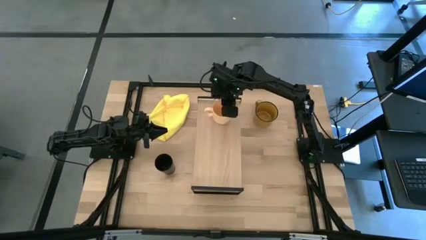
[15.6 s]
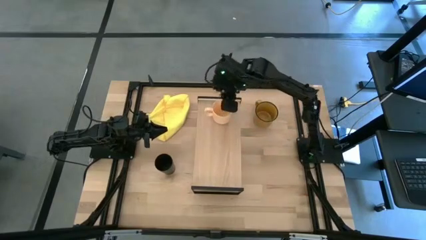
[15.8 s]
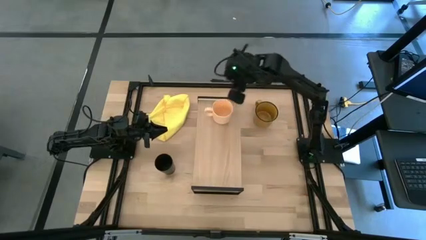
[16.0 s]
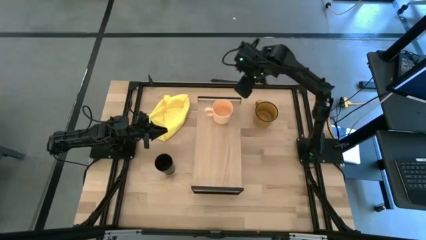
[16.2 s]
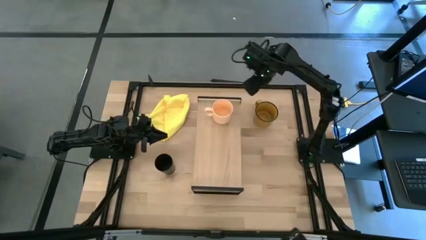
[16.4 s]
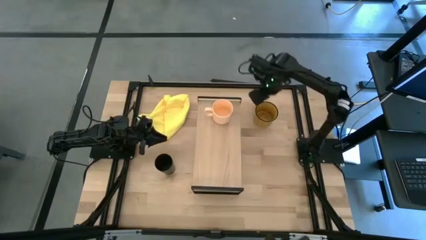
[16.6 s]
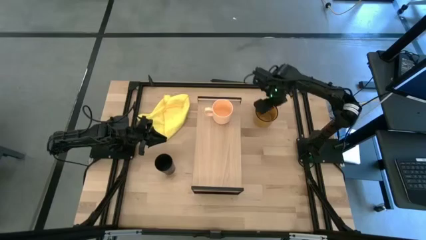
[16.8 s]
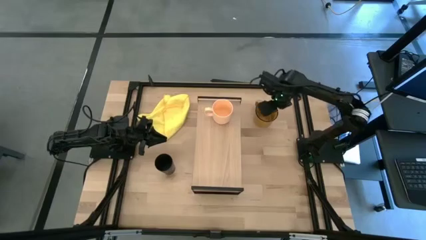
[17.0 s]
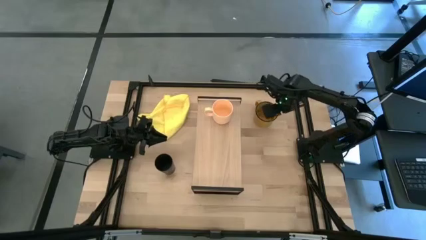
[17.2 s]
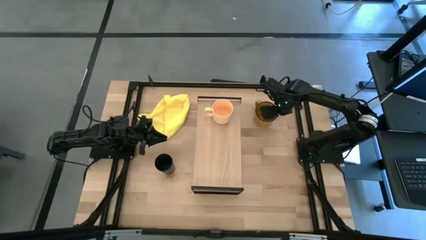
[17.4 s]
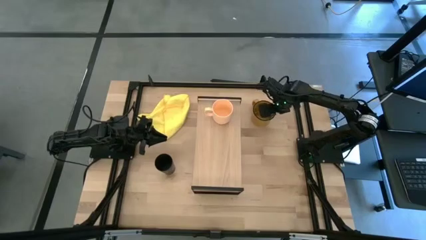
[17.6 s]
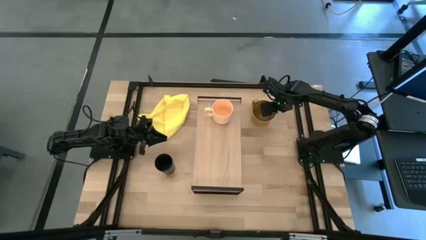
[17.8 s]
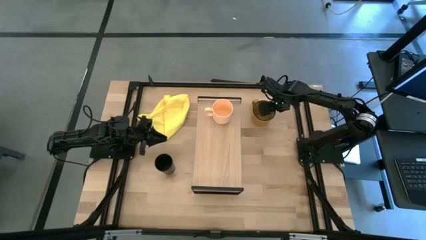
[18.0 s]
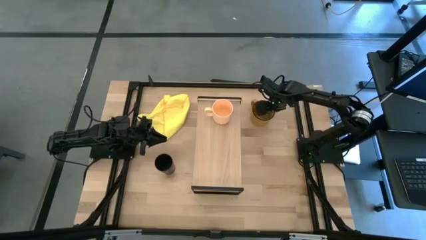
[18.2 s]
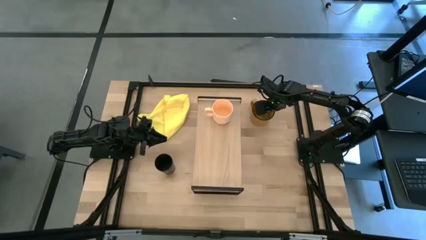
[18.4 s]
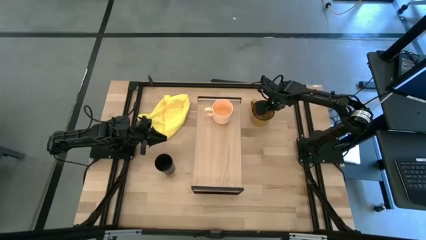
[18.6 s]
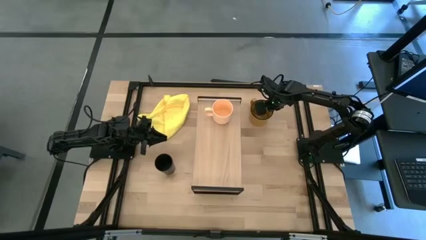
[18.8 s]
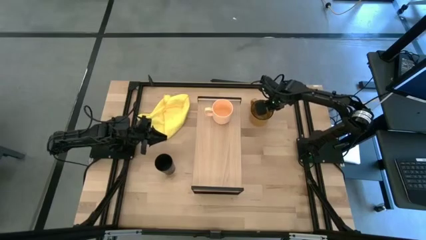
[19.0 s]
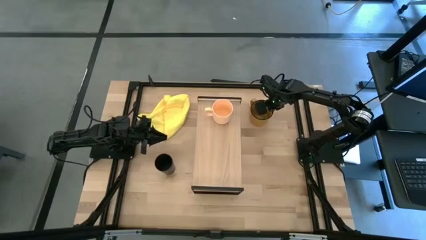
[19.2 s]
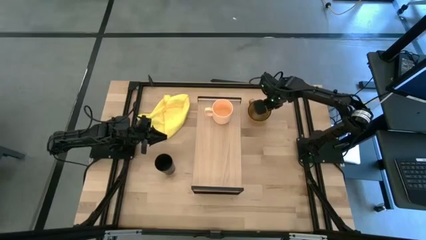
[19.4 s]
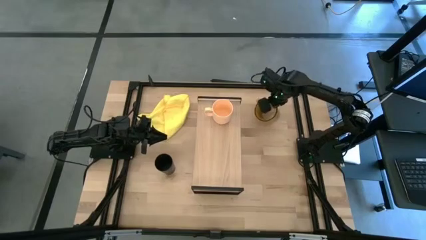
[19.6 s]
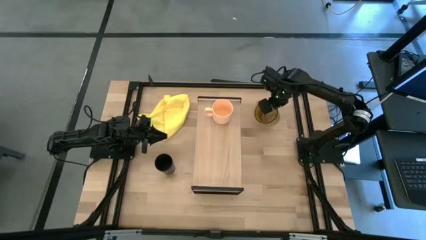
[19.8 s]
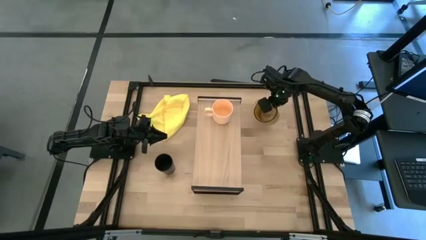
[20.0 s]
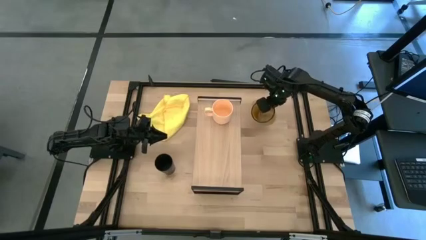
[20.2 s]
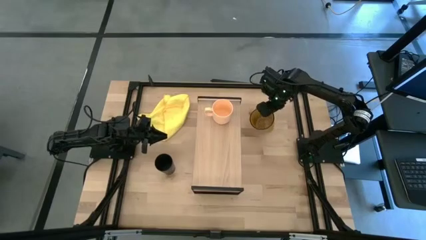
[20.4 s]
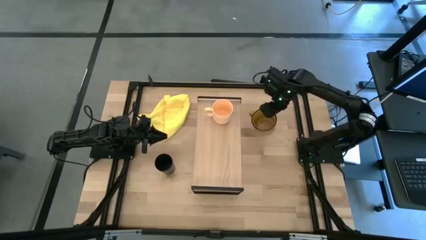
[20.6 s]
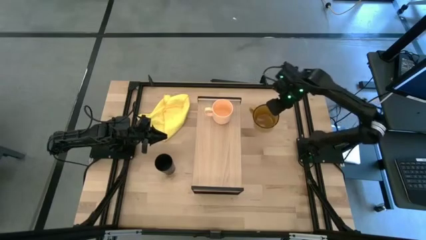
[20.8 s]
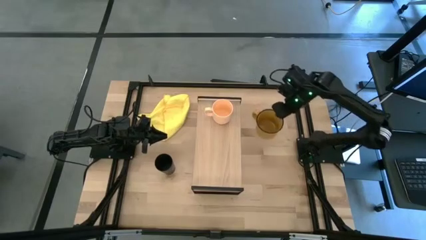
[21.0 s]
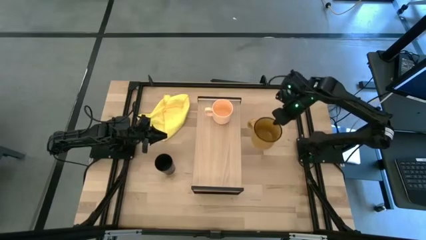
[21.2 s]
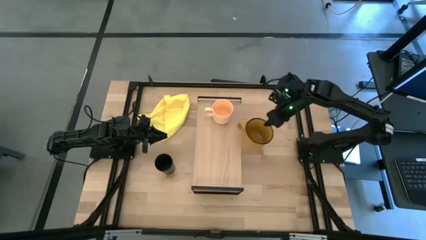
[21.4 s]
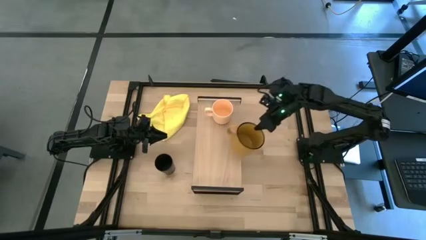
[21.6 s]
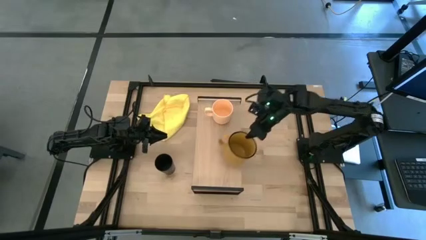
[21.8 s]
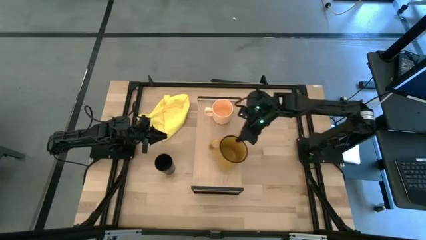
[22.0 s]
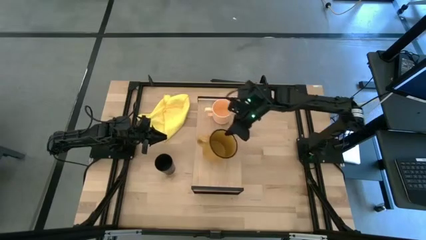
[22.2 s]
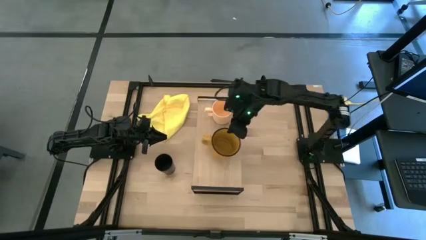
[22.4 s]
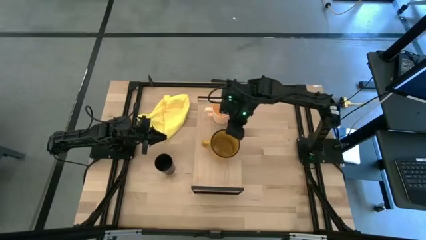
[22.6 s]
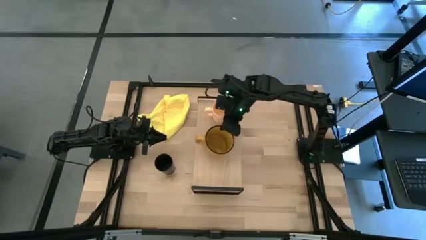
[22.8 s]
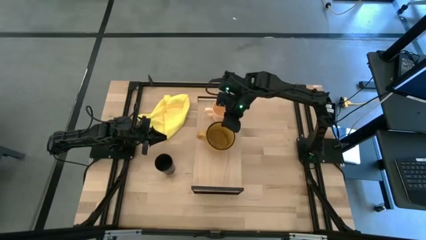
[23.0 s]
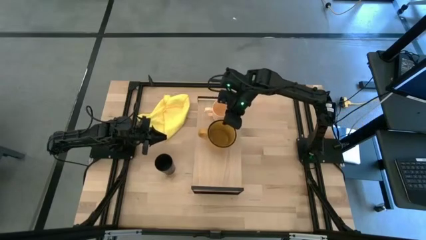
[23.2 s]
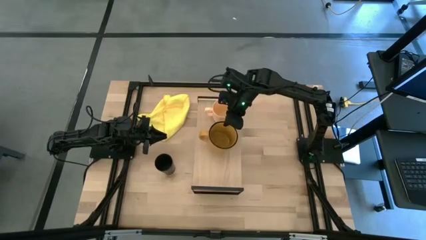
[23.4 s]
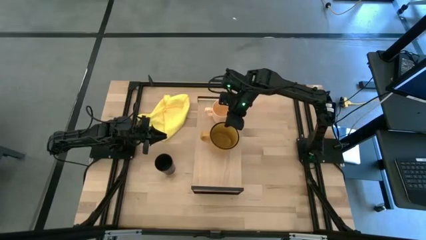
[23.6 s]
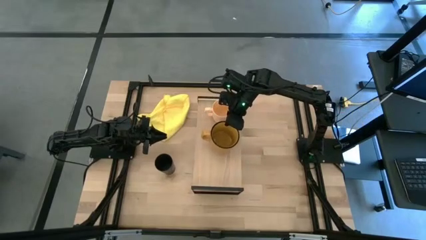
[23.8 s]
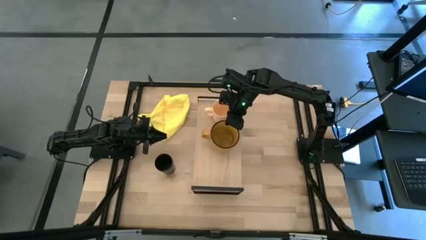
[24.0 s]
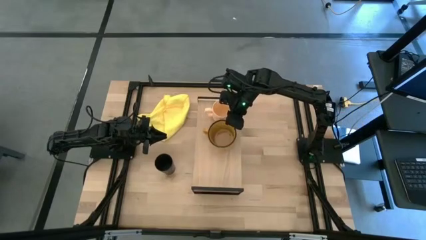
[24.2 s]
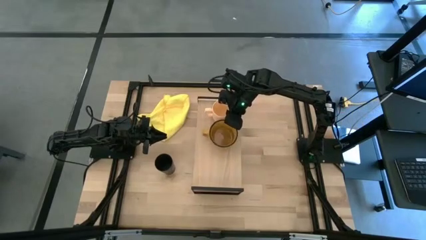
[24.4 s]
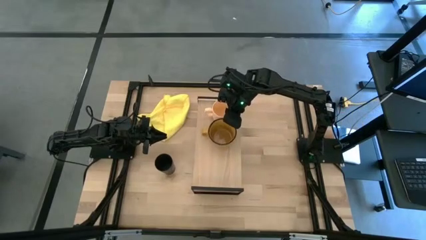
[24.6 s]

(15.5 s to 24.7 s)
Task: Stack small to large cups/mugs on shelf
Put the brown mug on the shelf

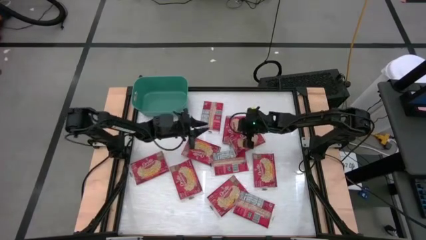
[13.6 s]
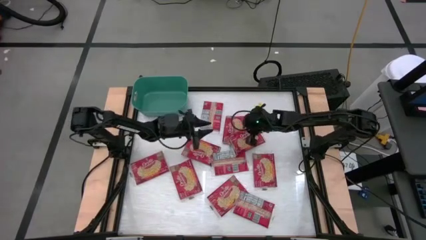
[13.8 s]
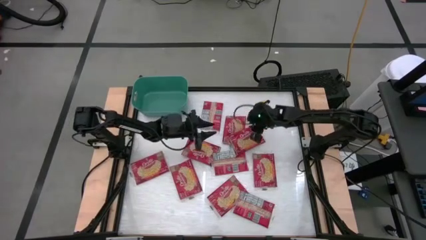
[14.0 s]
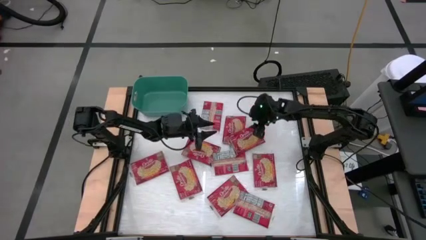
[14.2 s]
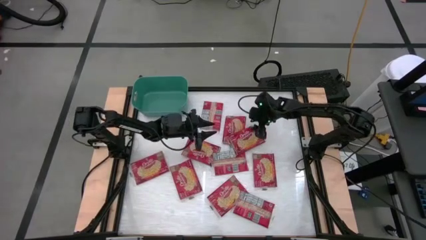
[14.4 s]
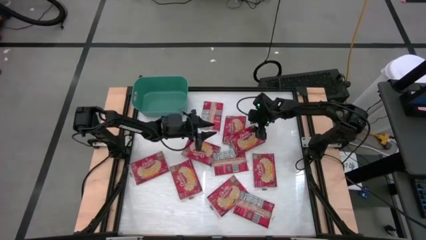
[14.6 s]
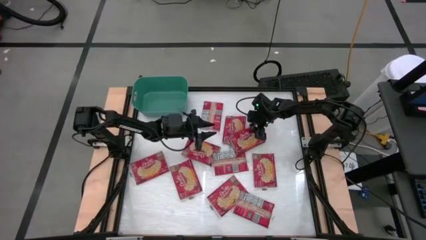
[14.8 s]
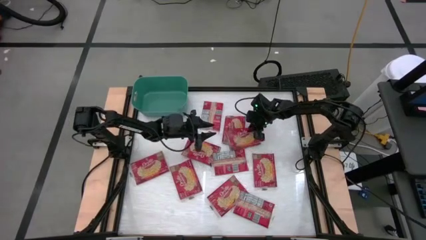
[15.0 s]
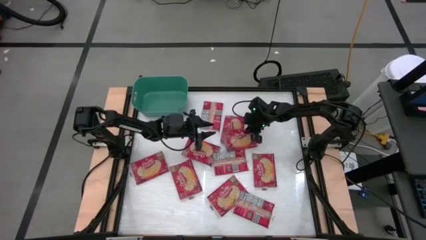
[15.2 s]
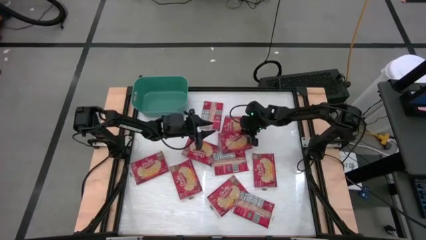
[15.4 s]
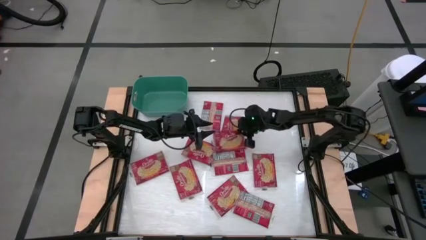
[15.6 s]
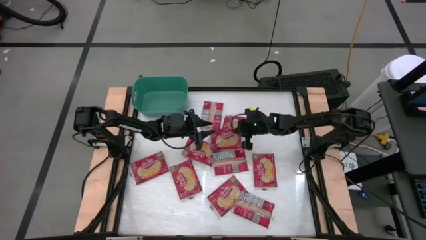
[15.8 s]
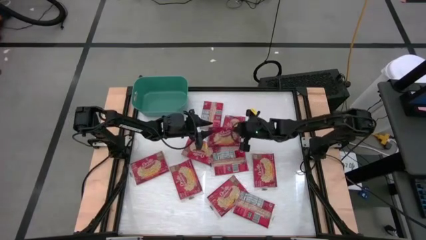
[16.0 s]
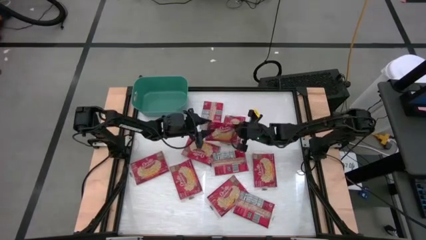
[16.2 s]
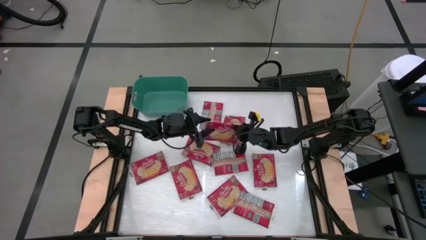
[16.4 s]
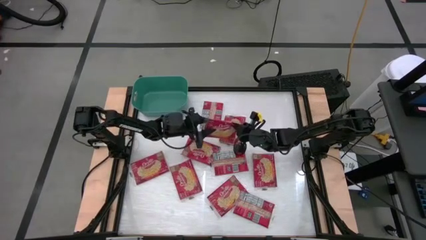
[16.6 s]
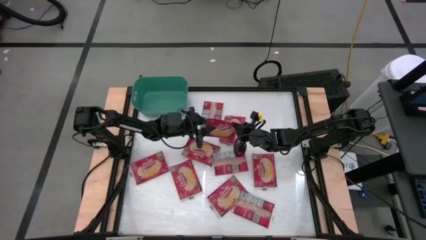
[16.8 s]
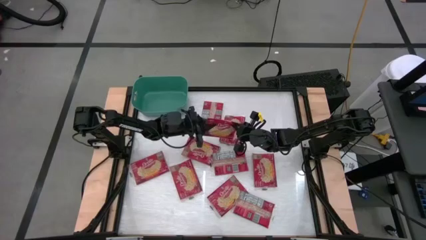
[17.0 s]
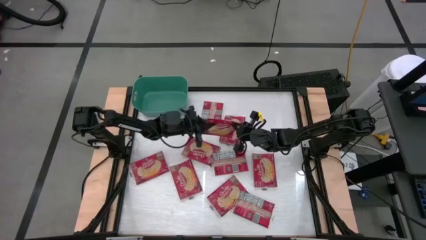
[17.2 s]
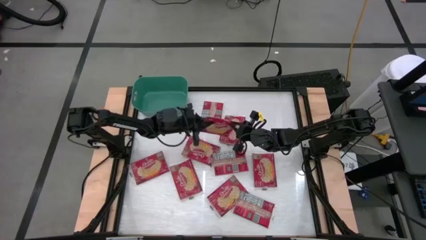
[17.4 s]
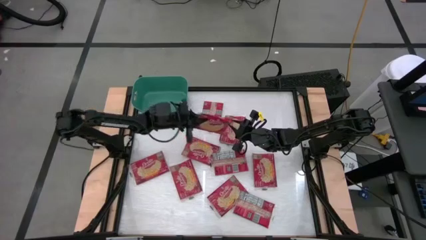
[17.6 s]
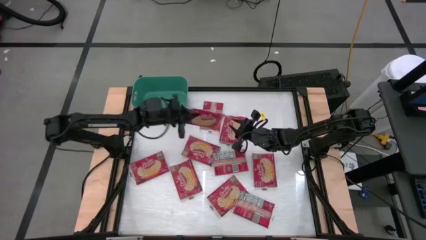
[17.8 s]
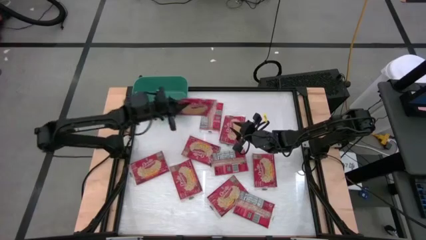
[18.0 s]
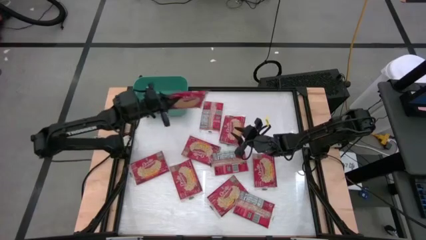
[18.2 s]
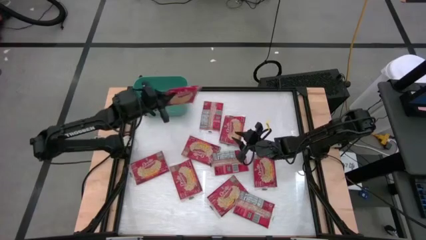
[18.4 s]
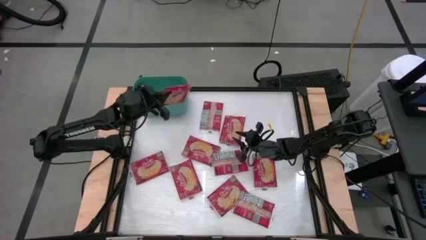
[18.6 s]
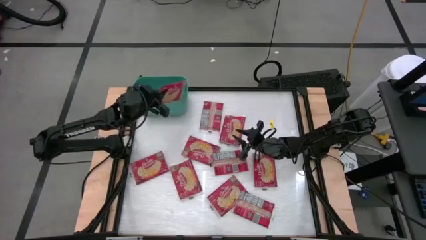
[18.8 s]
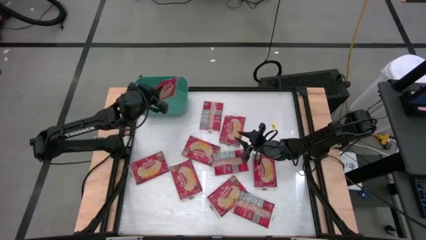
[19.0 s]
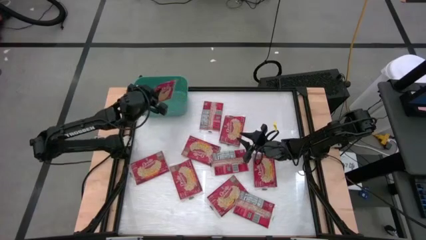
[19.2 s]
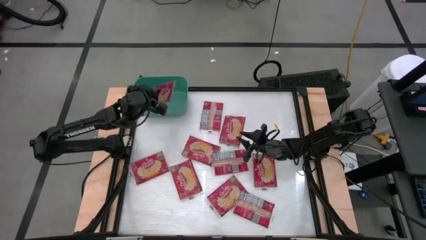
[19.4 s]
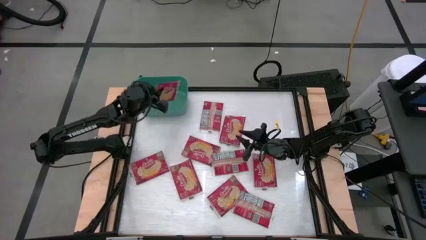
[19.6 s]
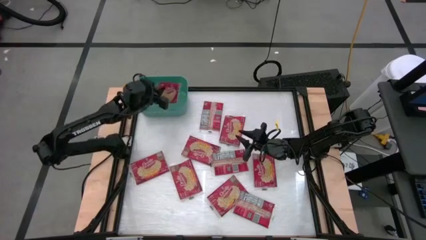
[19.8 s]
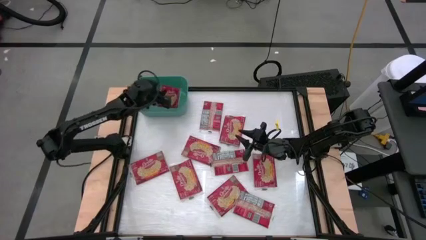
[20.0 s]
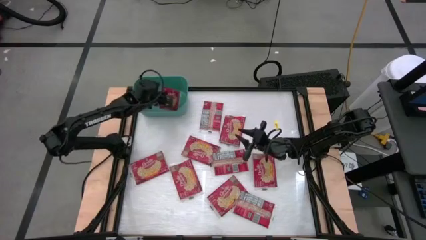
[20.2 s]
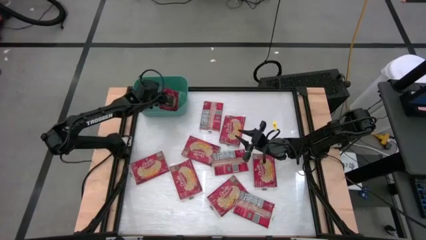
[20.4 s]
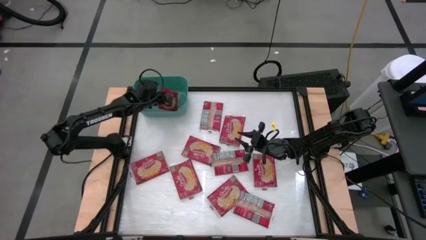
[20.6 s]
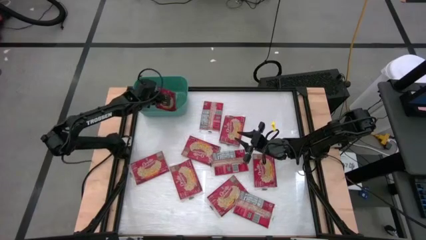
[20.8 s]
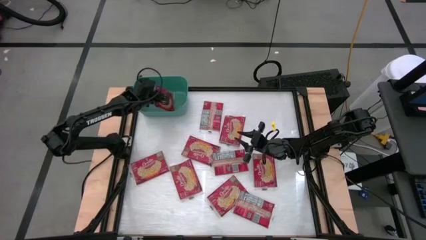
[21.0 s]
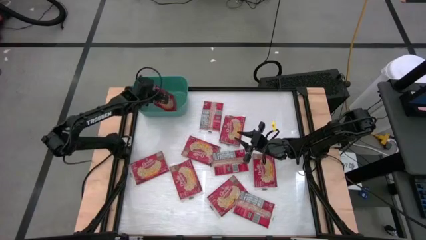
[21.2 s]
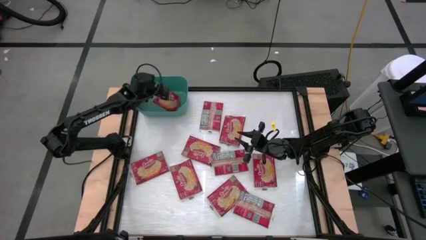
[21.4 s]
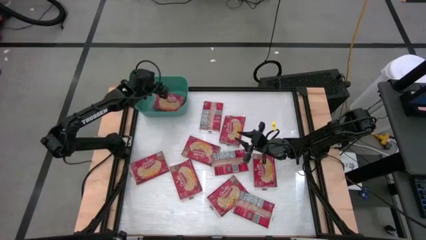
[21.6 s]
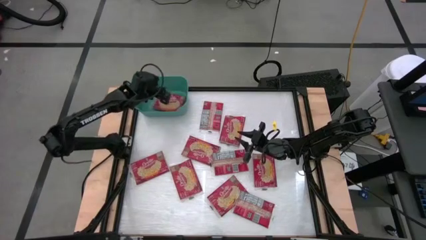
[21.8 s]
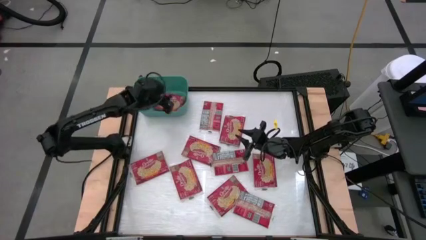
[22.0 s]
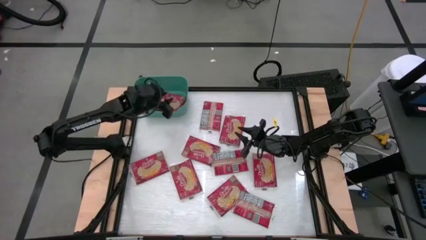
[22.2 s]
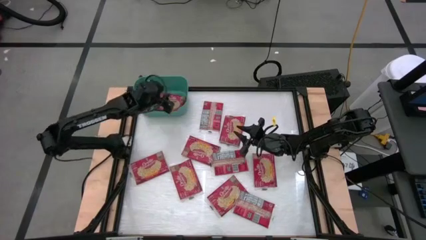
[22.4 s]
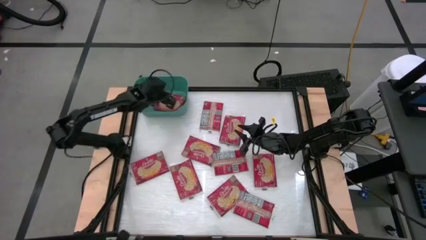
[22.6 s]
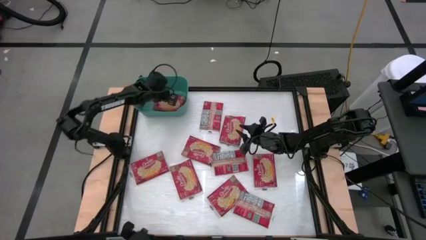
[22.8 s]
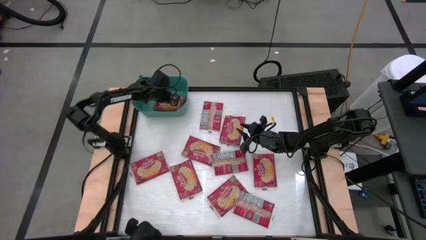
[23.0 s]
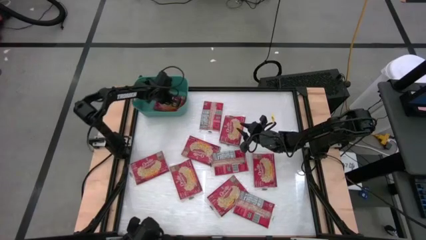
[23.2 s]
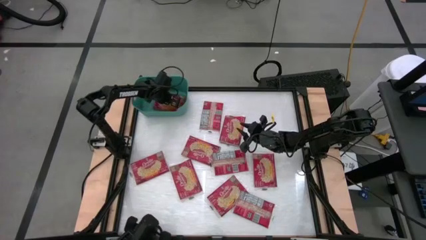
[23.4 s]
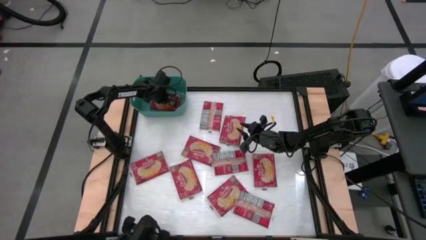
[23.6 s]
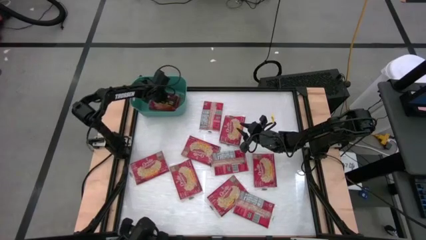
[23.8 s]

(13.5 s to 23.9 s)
Task: Sort popcorn bags into baskets
Stack the red popcorn bag on the red popcorn bag in the green bin
